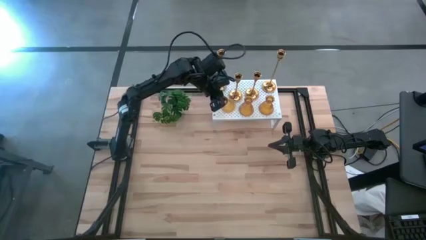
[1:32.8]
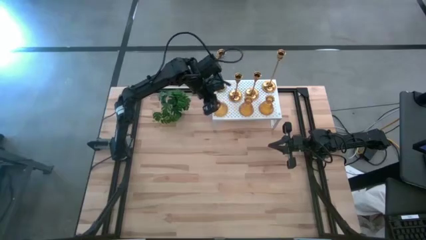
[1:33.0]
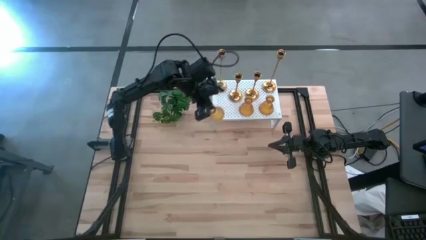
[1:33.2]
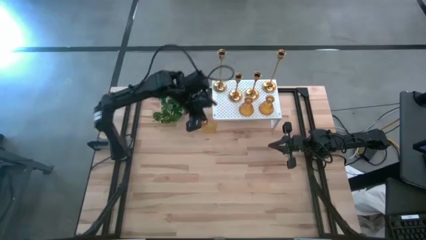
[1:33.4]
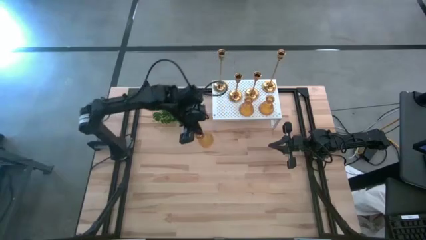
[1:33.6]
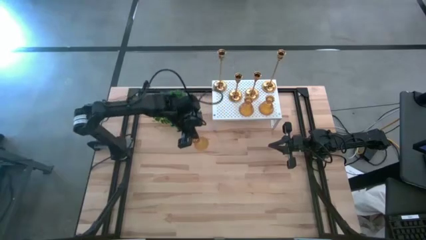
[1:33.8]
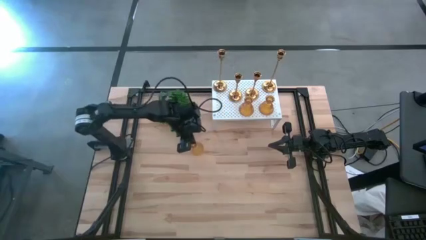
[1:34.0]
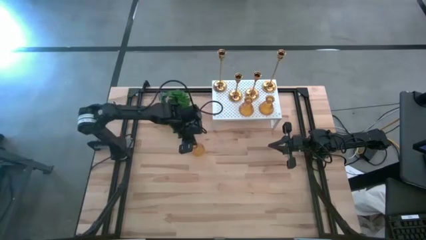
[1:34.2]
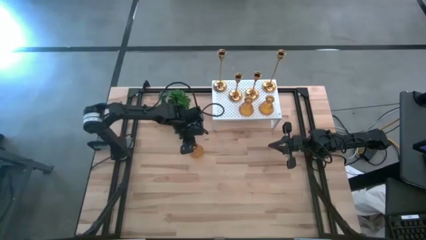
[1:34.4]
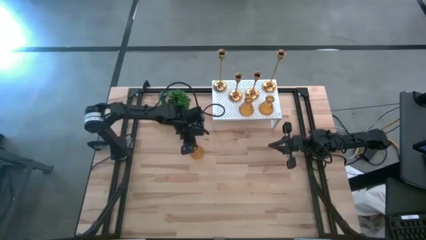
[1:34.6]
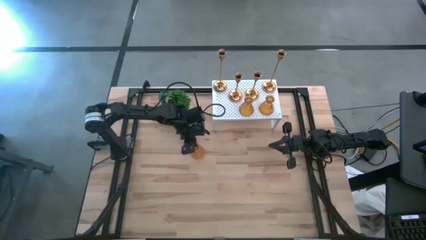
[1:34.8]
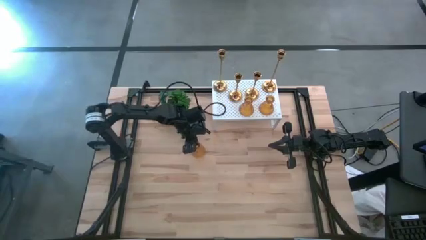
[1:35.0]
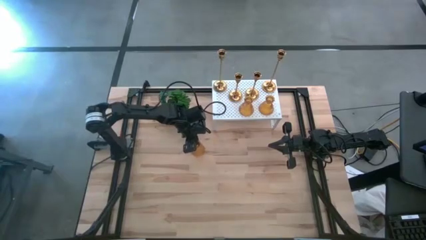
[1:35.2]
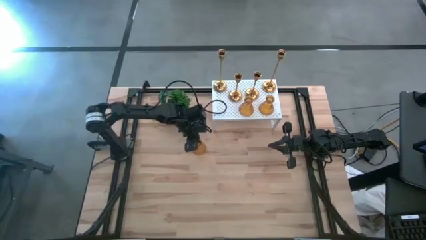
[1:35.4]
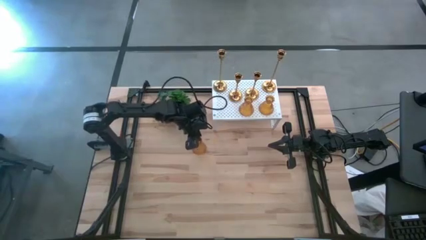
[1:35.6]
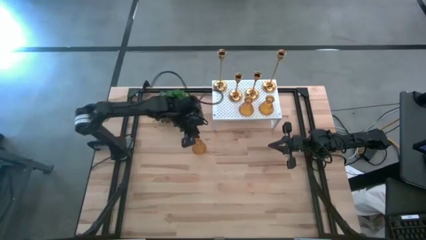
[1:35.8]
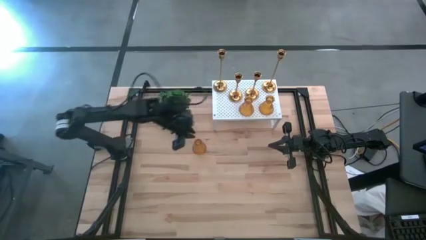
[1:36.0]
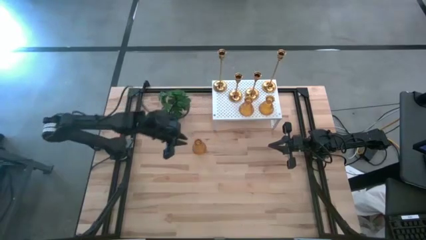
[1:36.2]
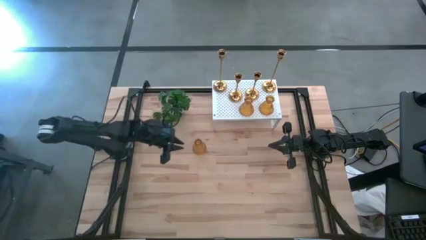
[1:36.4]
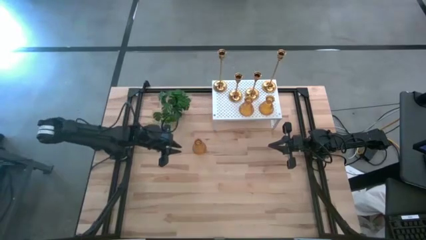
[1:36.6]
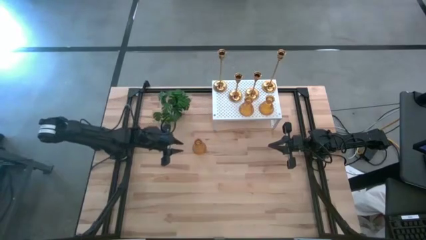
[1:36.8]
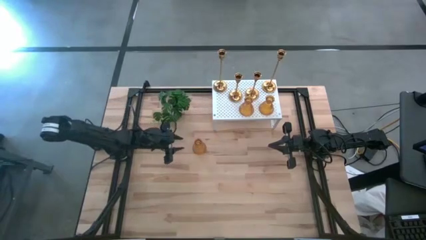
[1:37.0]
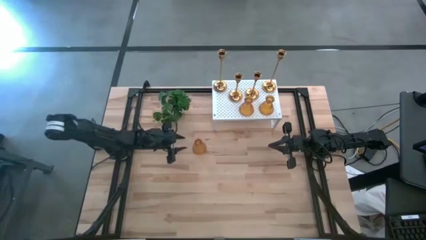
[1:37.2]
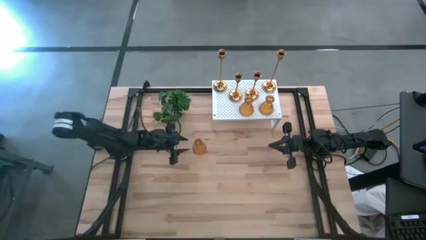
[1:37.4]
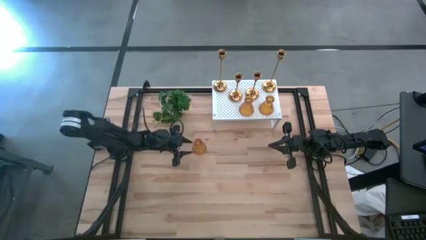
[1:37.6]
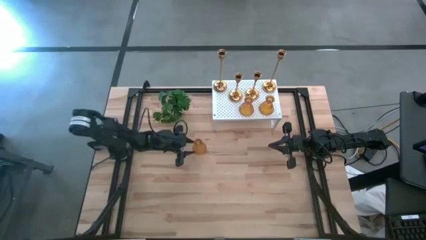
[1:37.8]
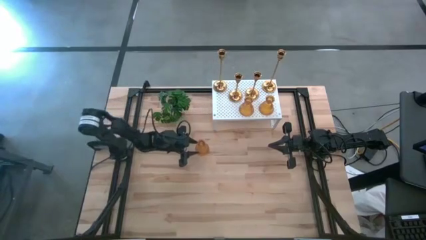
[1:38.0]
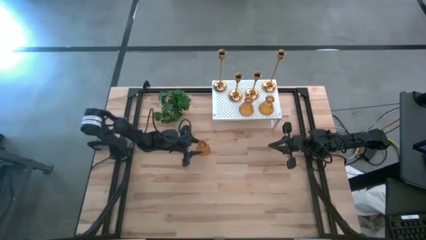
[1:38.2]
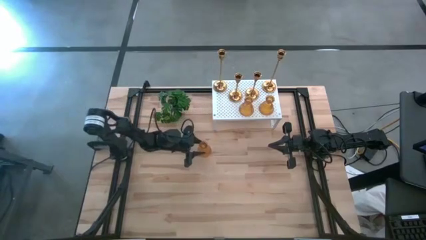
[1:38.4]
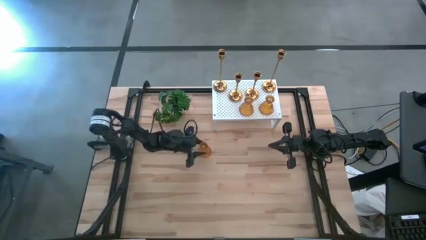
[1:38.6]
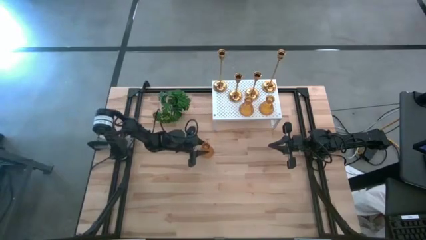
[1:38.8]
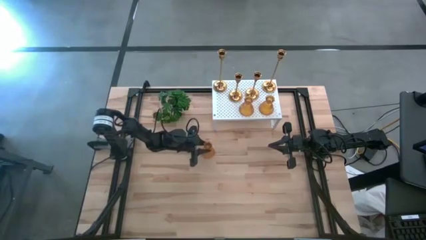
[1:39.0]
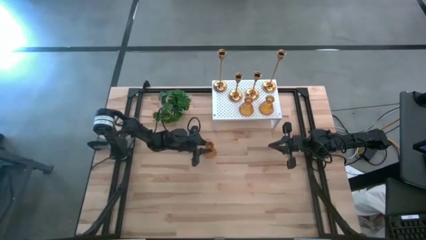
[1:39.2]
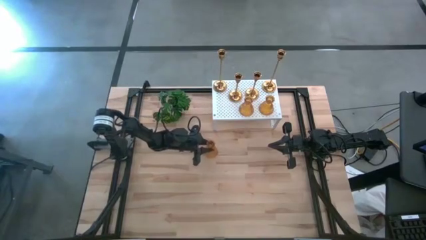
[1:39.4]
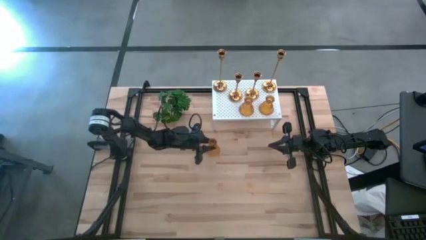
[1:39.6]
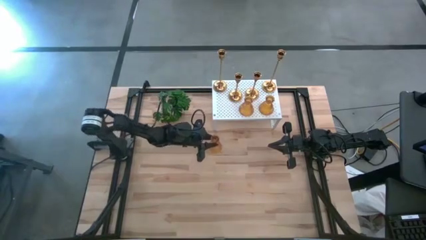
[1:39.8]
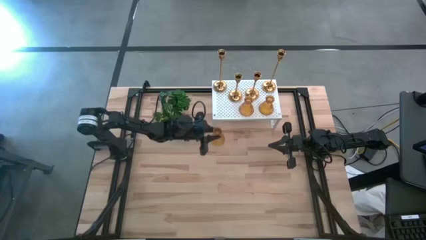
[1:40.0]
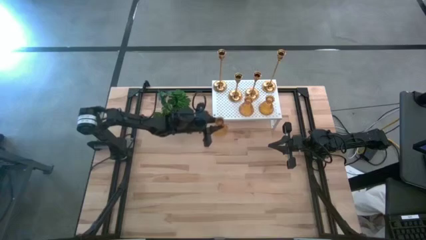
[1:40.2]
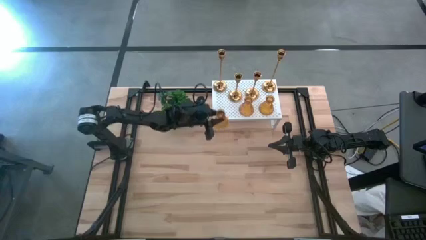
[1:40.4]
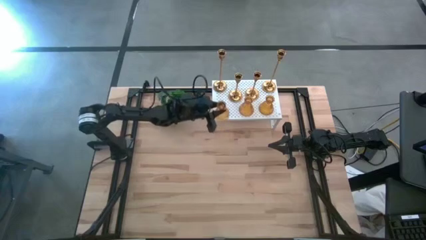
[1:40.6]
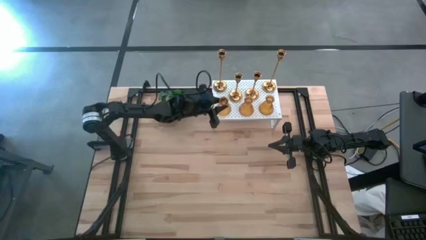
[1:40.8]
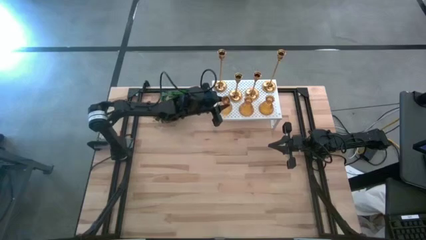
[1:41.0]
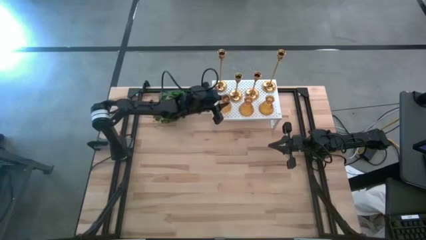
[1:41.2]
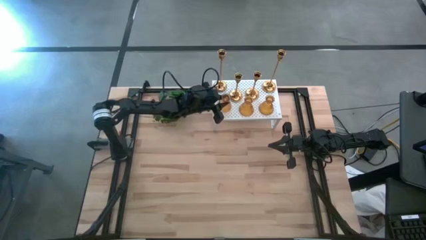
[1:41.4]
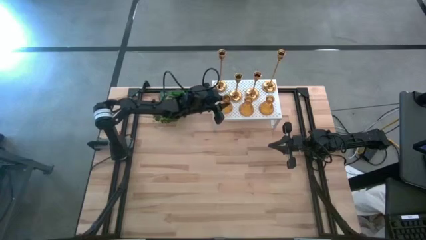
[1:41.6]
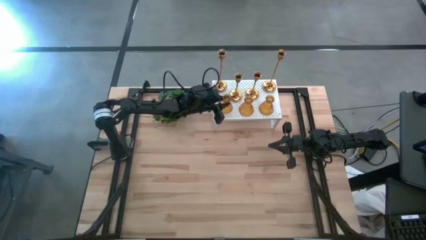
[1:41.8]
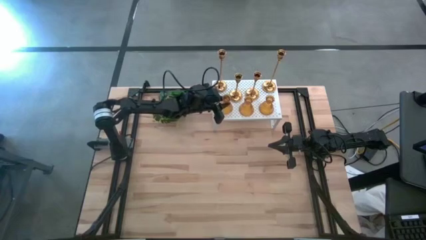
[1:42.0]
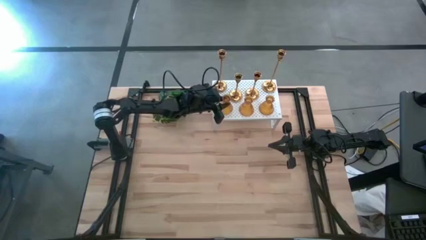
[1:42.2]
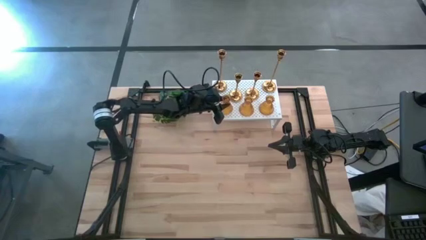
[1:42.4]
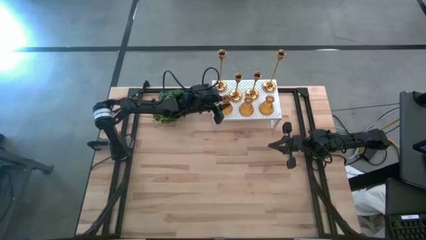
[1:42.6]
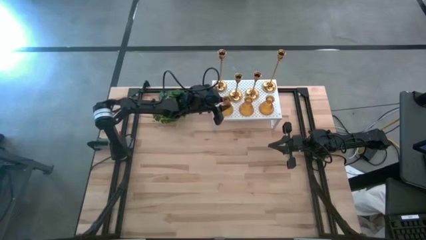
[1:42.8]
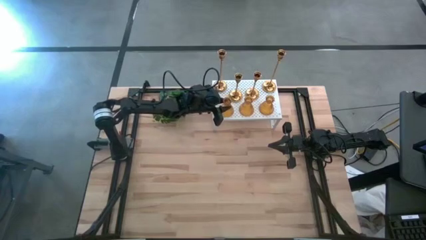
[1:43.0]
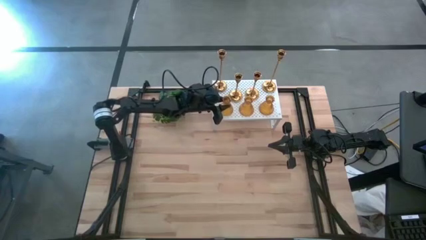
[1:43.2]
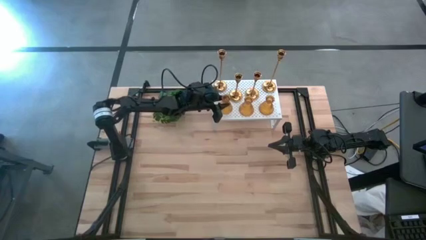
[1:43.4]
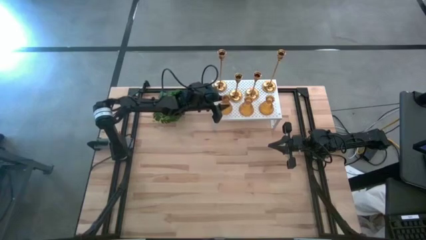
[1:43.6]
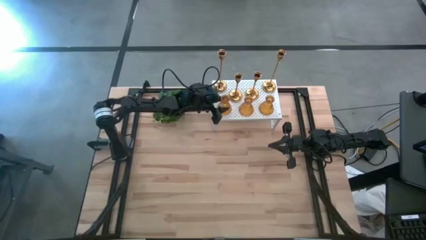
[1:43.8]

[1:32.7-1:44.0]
Task: Pick & Place candle stick holders
Put the orange glass candle holder on the shelf

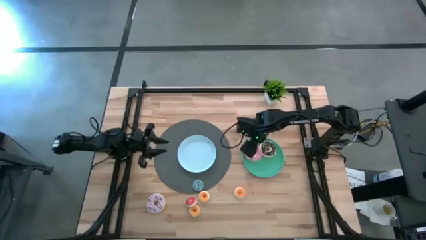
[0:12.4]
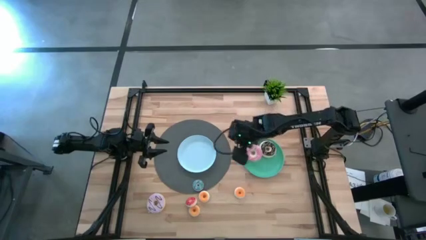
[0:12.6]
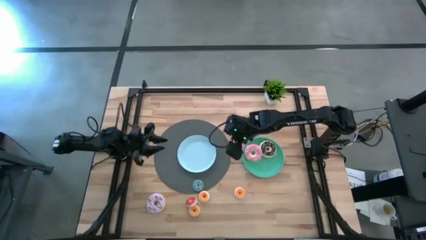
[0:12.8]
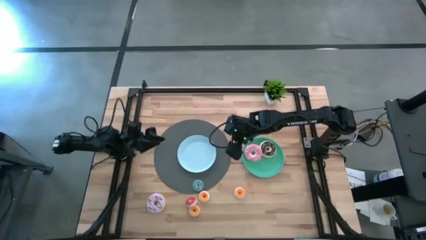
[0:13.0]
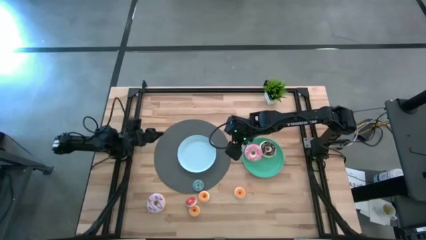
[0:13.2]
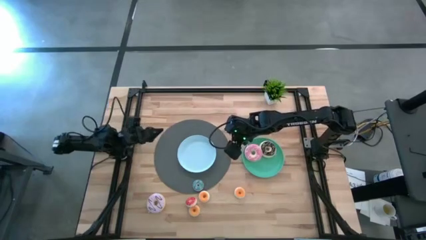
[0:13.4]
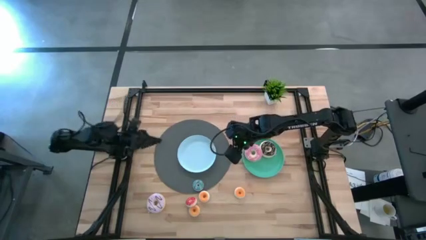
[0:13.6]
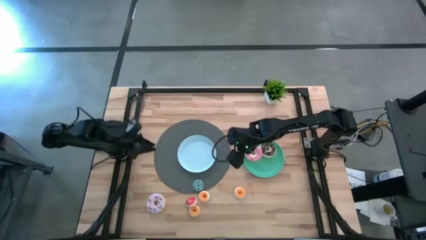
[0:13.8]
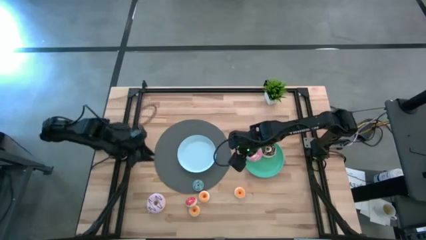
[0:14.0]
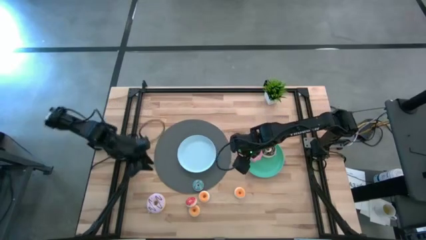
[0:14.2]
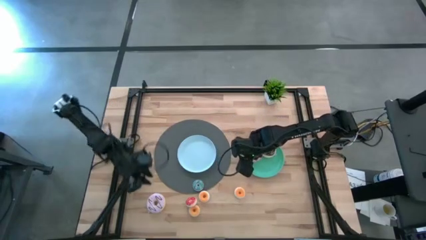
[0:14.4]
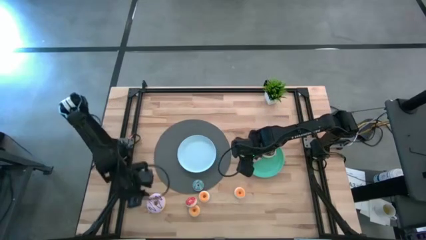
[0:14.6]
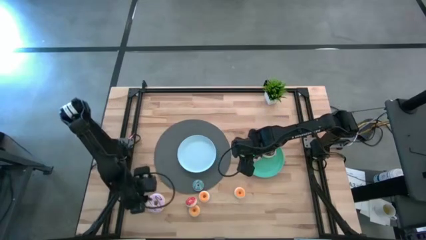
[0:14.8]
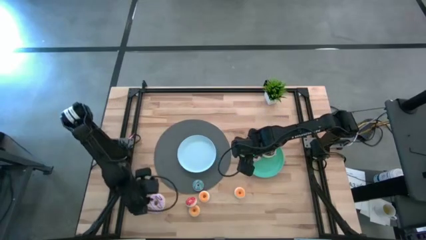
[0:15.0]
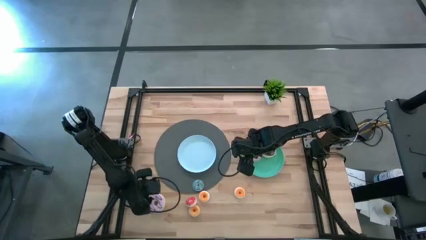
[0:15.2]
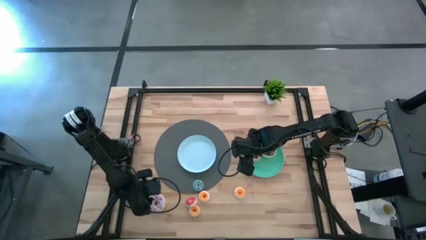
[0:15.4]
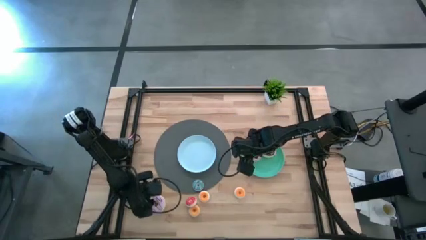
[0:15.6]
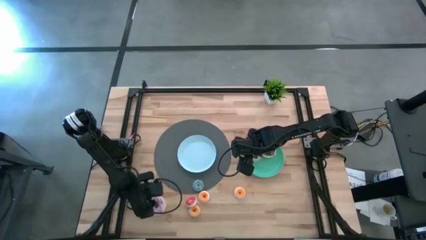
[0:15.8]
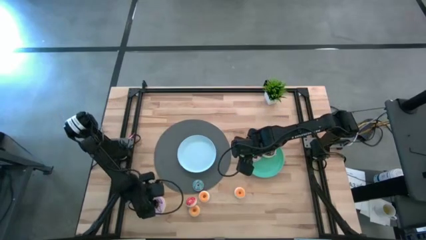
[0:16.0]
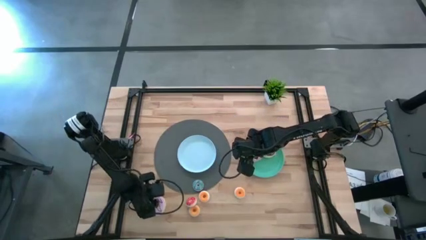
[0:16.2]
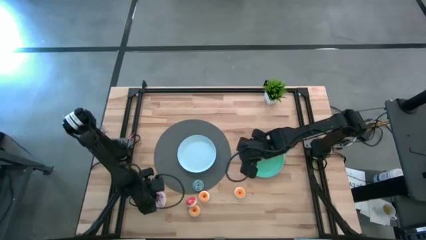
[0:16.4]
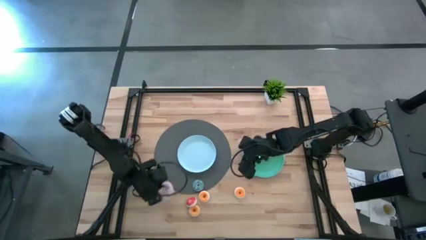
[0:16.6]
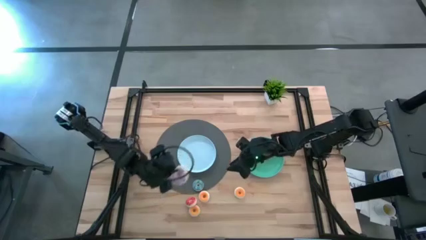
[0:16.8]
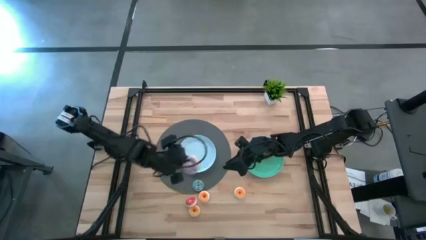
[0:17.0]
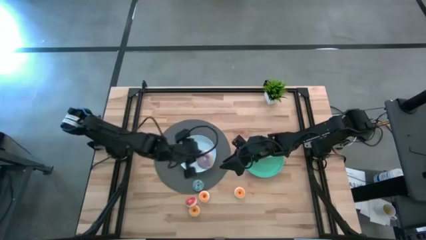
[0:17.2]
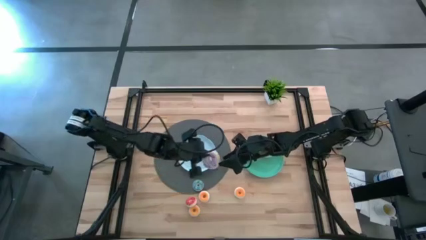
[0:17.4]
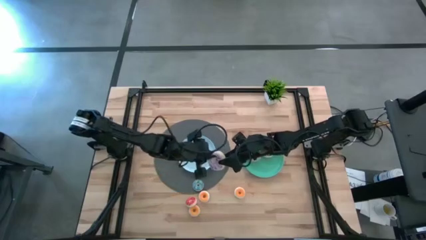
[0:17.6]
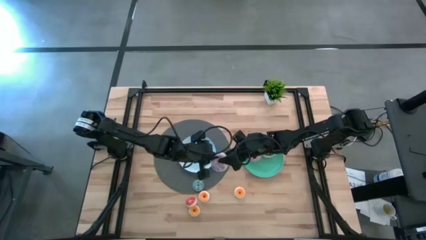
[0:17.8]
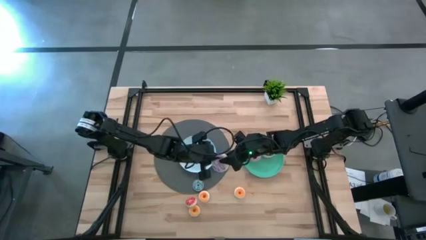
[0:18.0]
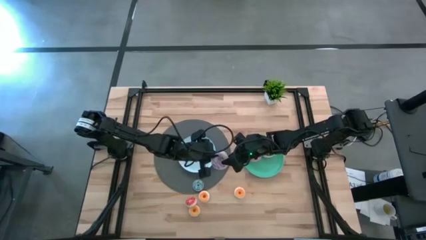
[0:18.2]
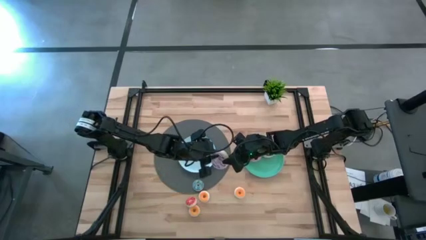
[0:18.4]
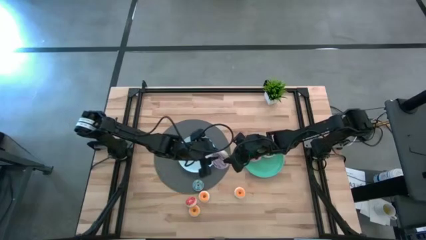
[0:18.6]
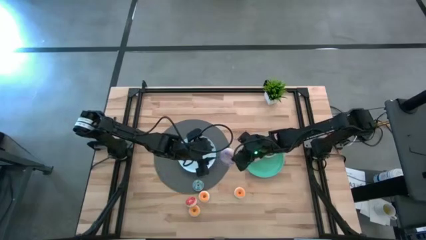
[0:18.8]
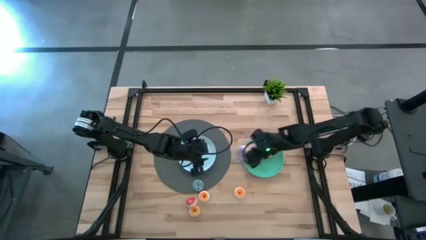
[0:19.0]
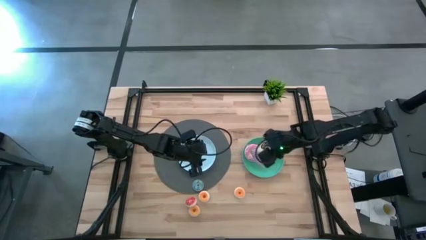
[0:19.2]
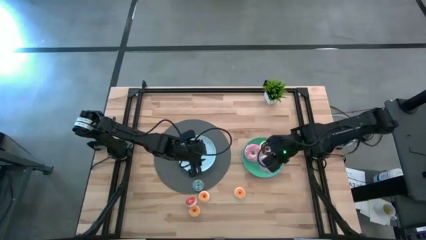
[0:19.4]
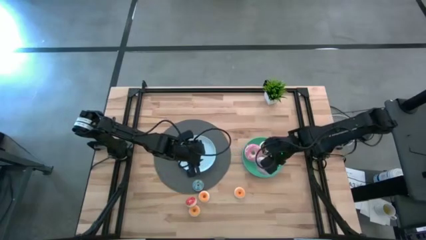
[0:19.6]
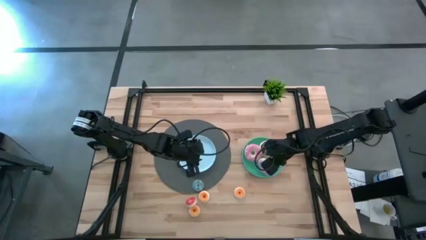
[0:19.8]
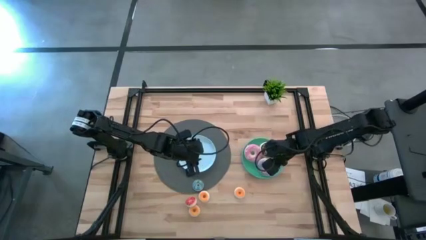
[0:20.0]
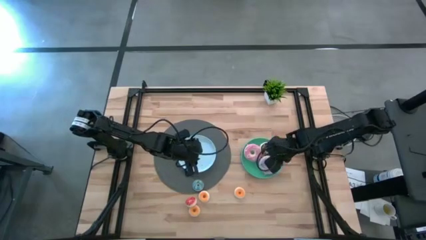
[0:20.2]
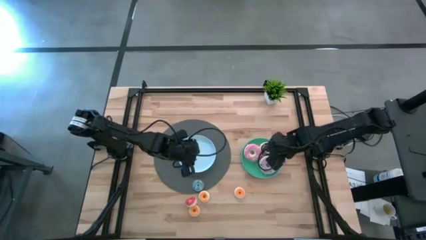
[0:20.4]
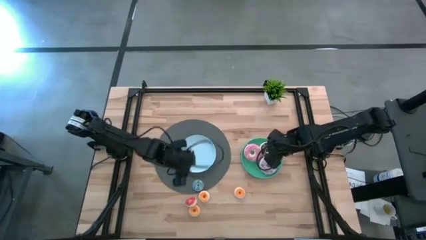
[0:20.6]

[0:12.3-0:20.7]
Task: Pick & Place donuts
Put the big purple donut on the blue and green plate
